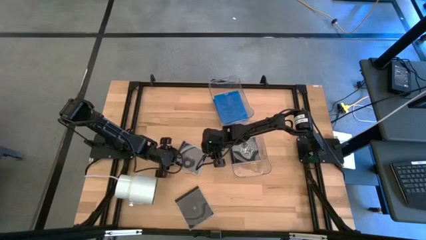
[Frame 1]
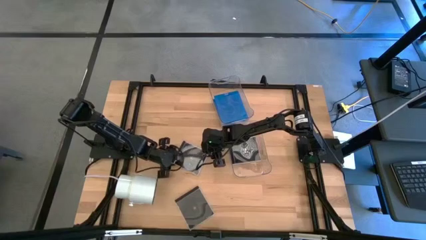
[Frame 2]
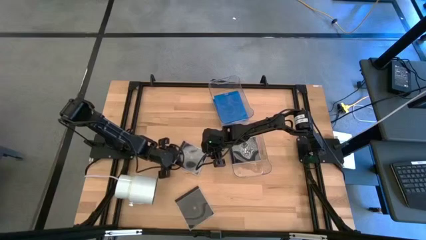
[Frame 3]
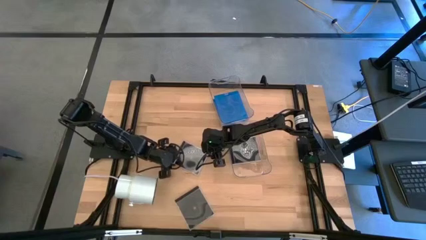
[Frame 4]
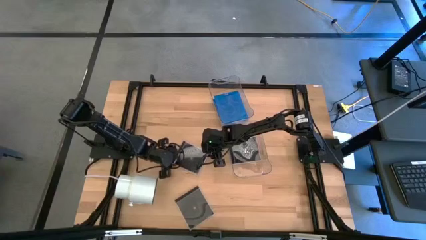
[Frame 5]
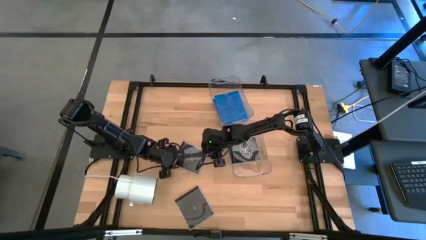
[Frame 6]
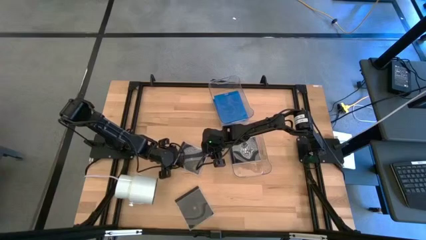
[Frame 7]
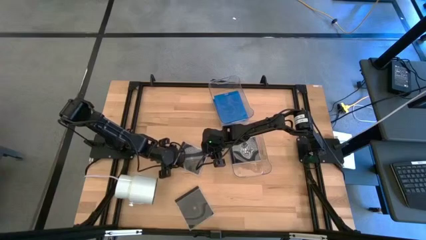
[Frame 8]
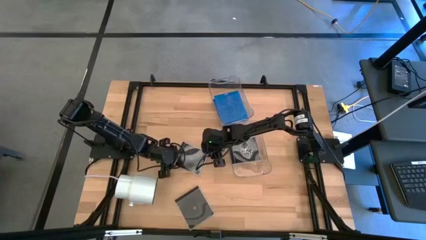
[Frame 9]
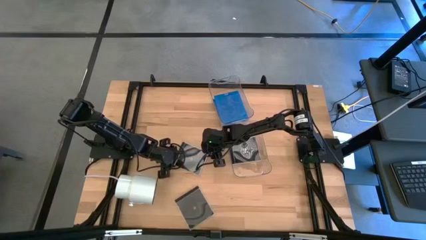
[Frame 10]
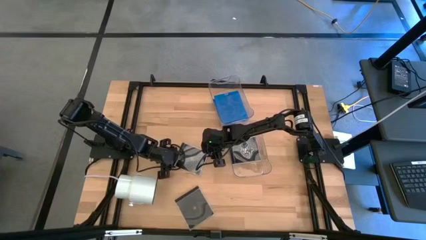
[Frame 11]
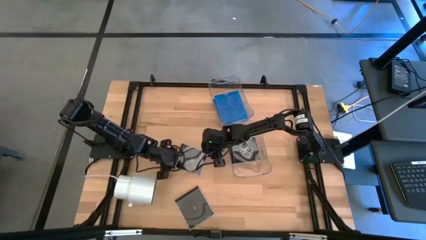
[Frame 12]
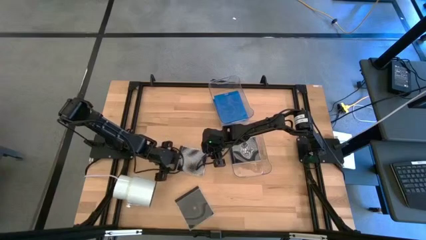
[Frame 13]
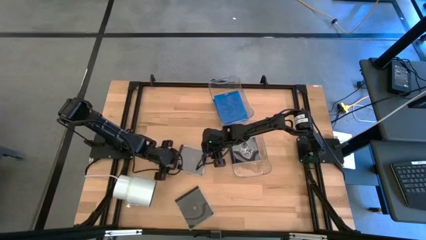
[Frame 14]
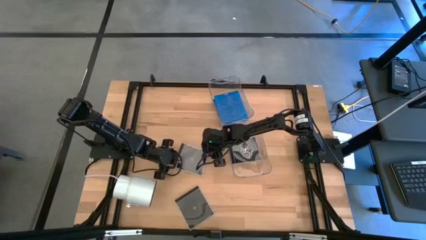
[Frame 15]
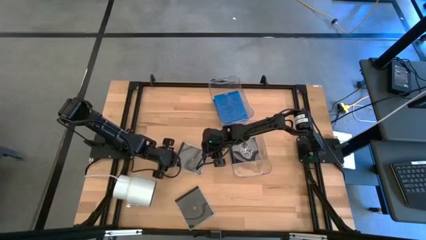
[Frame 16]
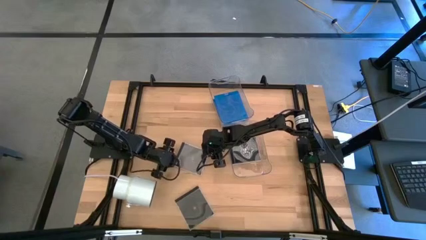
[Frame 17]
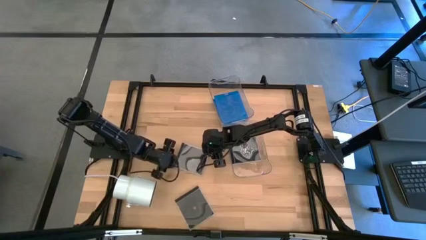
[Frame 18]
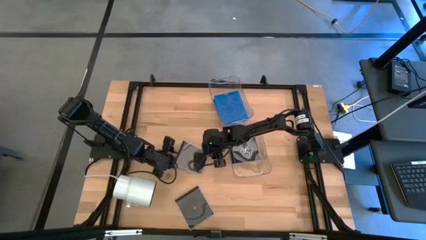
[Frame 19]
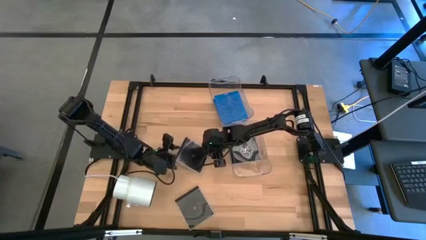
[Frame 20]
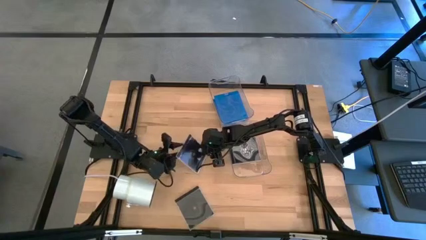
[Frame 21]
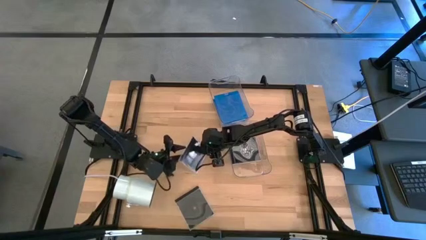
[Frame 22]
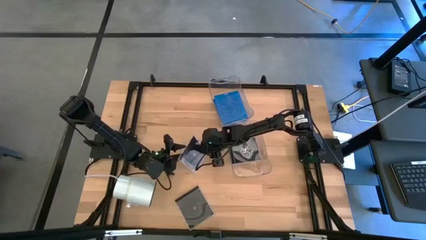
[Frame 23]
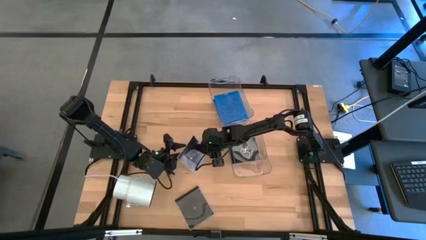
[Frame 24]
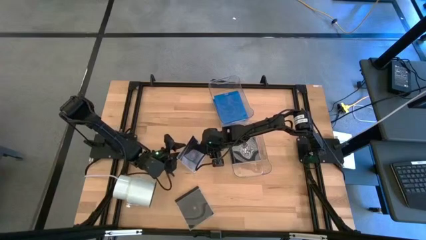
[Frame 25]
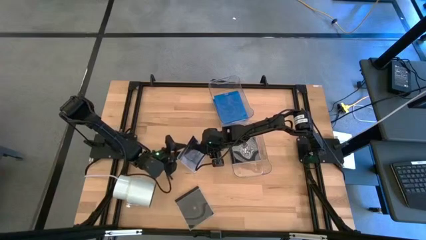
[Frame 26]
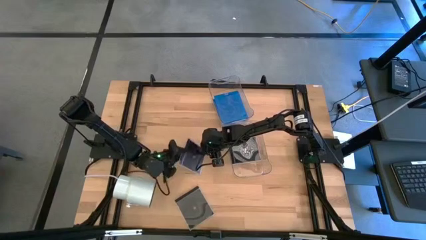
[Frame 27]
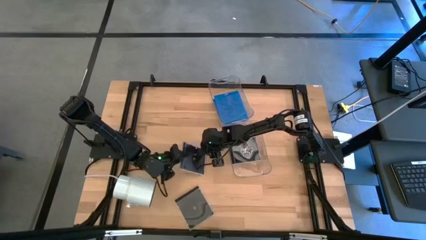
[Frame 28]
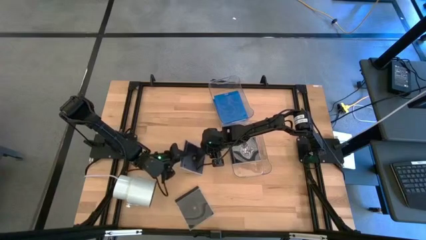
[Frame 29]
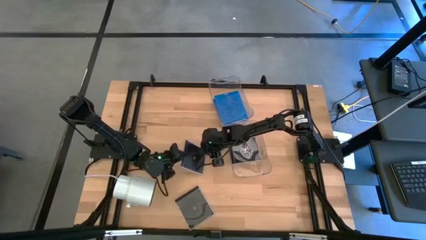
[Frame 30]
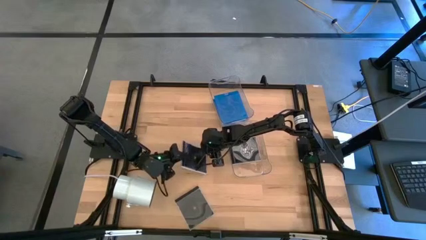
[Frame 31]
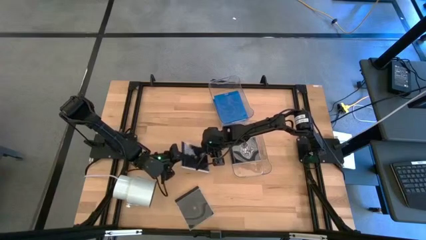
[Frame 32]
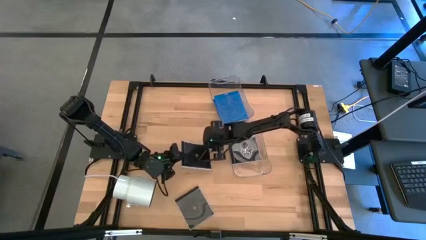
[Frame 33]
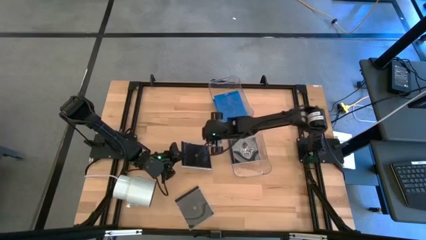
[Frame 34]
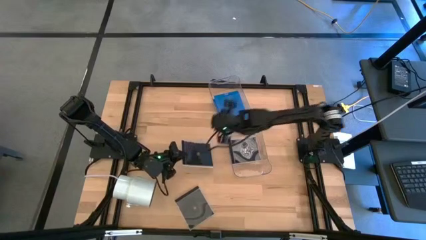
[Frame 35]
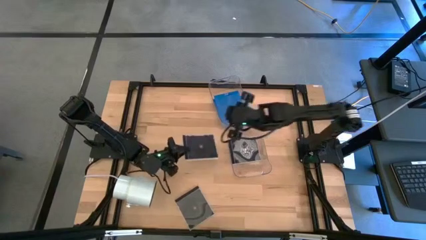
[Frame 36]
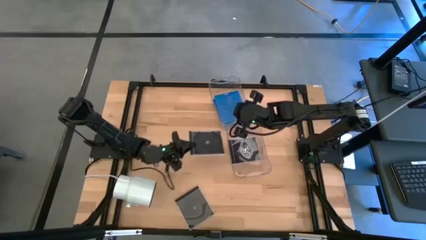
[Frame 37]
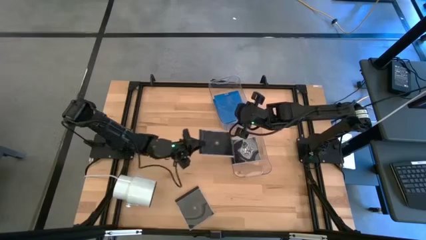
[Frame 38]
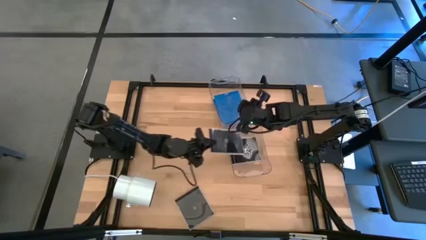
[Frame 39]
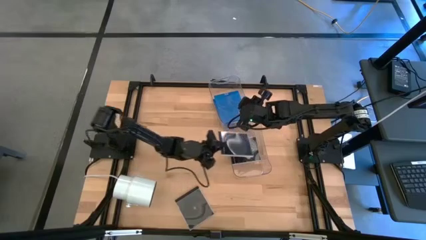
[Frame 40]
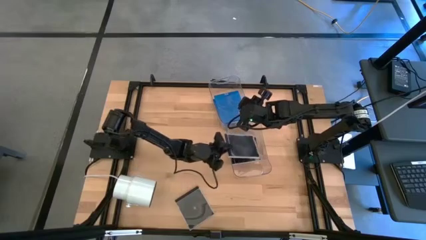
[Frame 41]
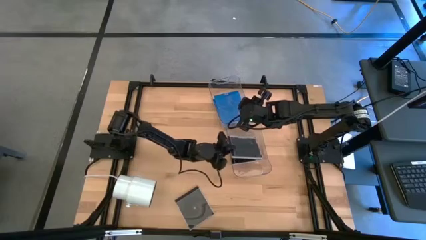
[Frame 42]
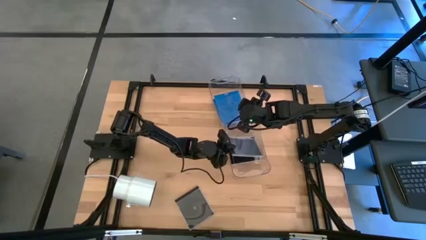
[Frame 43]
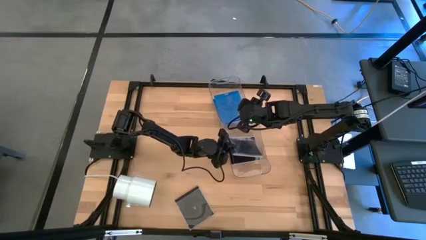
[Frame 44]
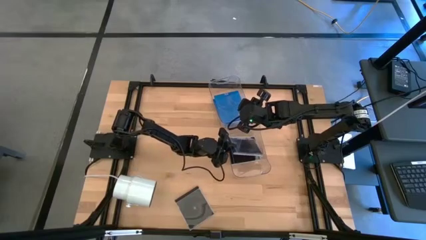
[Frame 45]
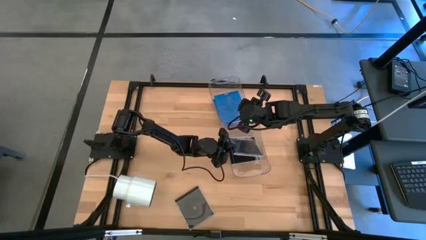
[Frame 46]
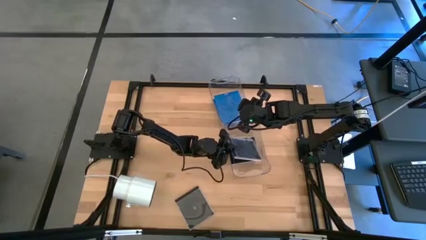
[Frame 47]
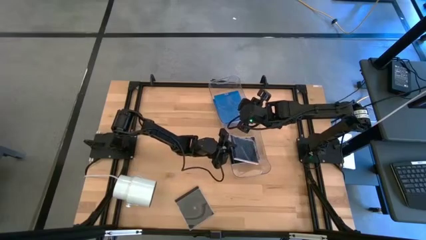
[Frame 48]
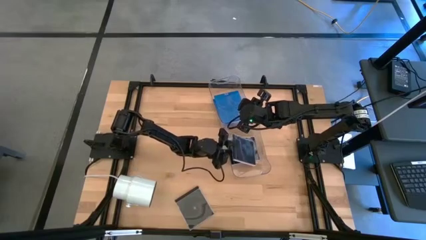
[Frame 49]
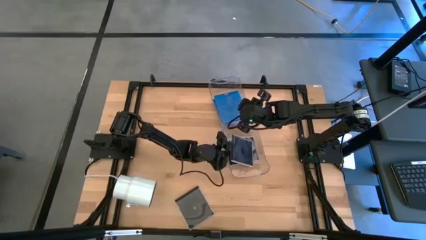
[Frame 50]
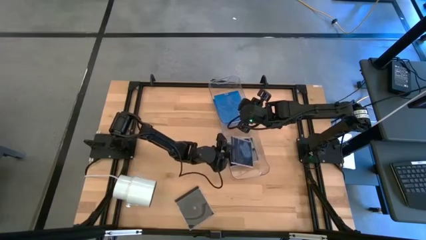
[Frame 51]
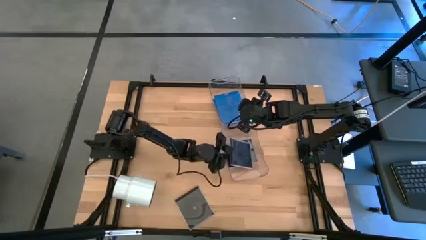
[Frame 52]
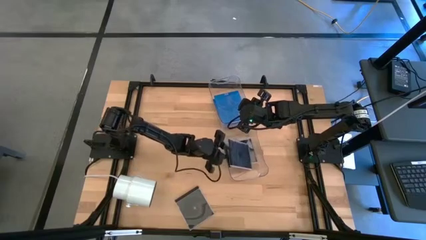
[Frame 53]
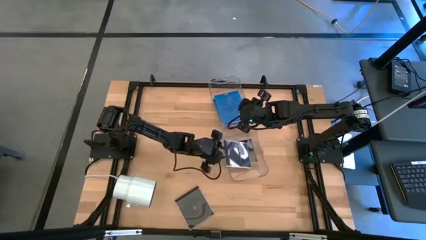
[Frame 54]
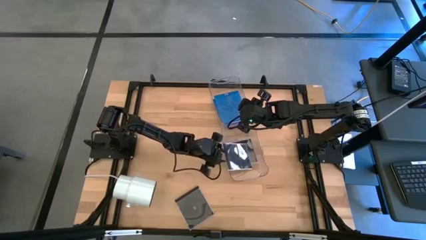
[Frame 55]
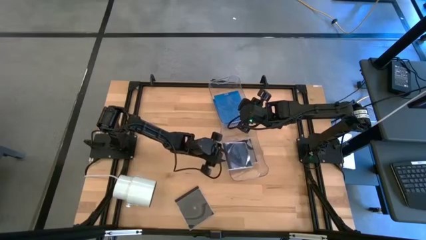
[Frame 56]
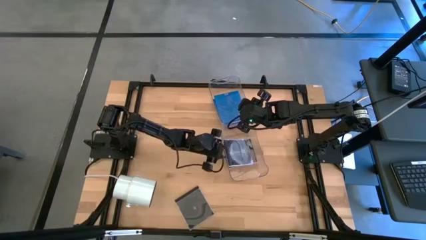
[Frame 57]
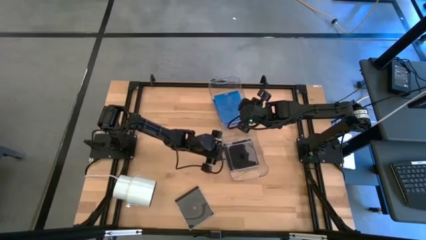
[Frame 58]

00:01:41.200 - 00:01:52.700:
Task: Pick & place jewel cases by type
Put the top black CD case into the bottom transparent bin

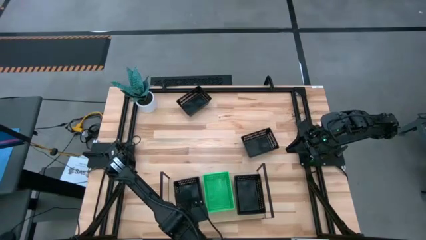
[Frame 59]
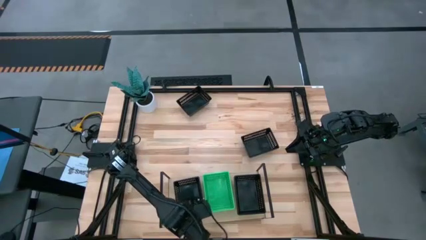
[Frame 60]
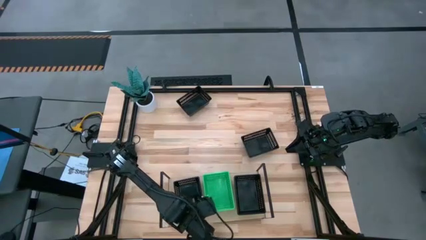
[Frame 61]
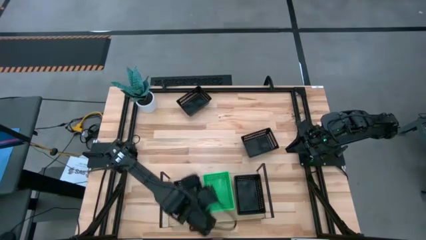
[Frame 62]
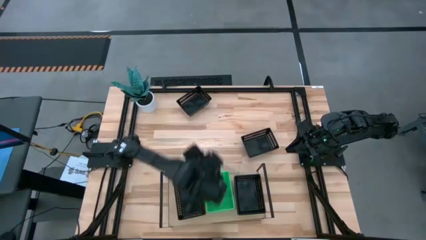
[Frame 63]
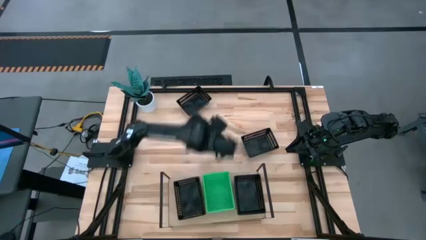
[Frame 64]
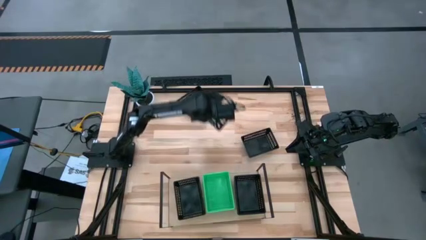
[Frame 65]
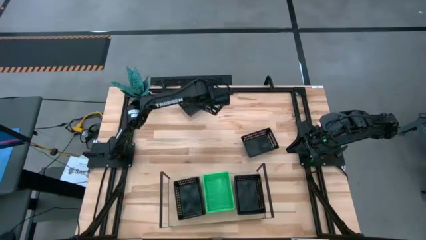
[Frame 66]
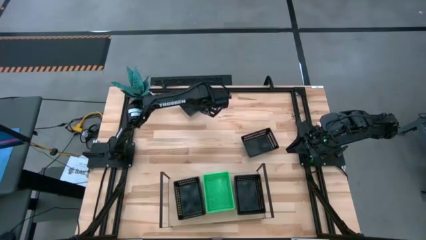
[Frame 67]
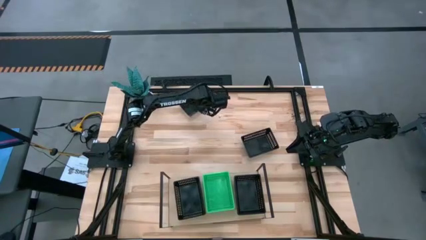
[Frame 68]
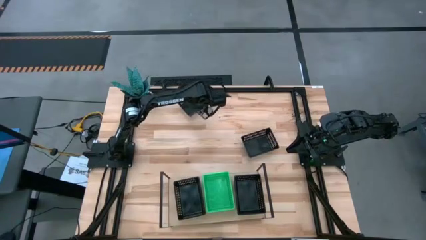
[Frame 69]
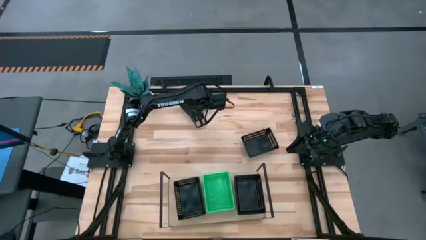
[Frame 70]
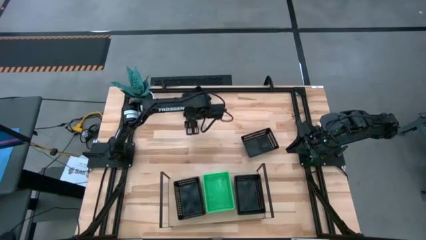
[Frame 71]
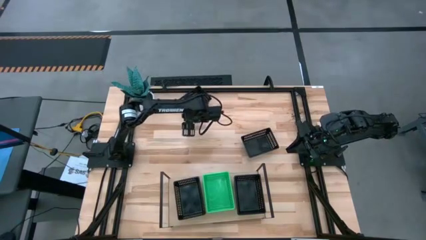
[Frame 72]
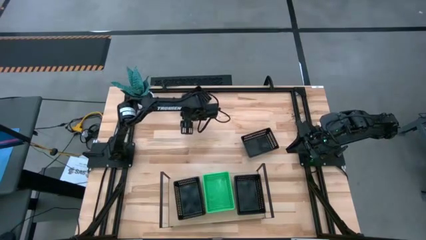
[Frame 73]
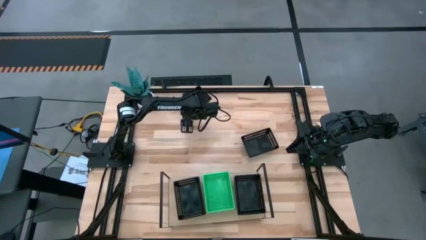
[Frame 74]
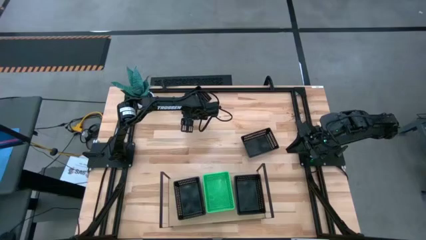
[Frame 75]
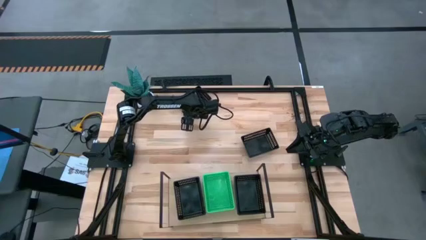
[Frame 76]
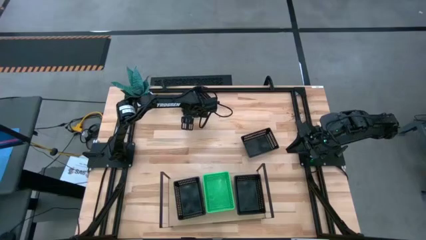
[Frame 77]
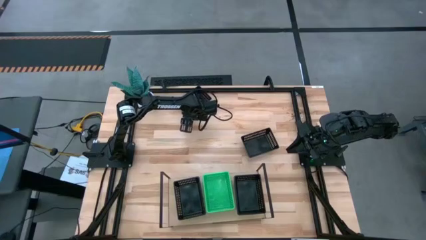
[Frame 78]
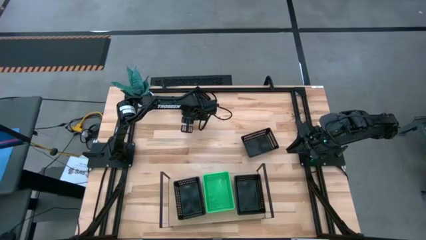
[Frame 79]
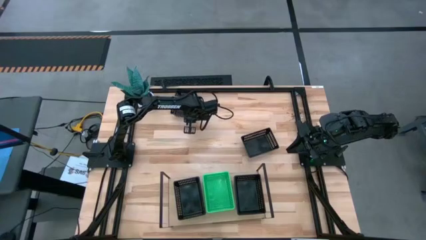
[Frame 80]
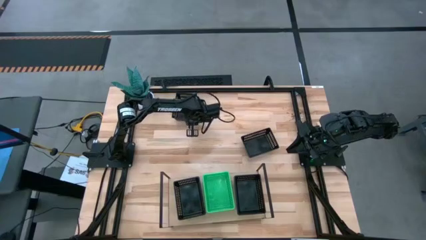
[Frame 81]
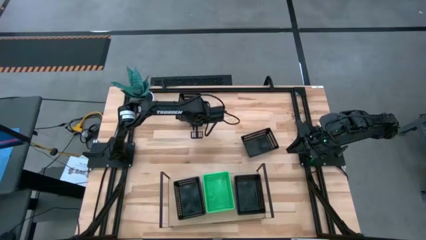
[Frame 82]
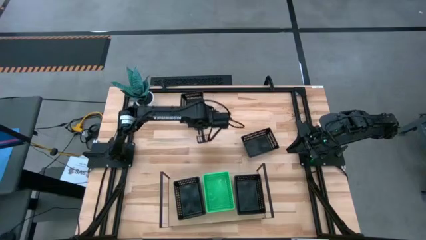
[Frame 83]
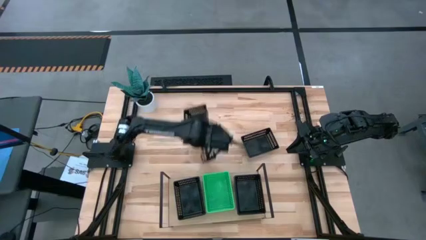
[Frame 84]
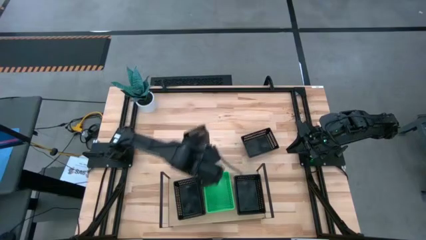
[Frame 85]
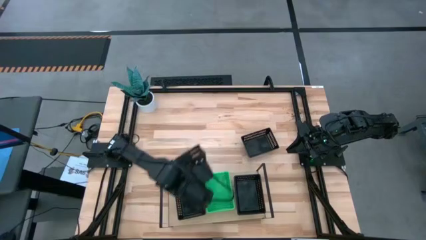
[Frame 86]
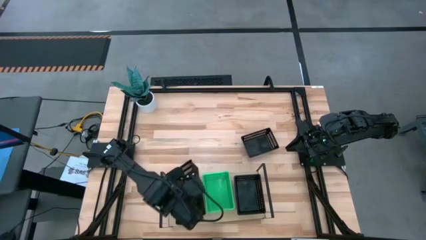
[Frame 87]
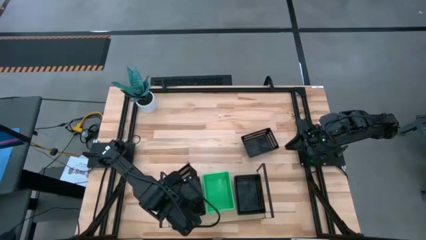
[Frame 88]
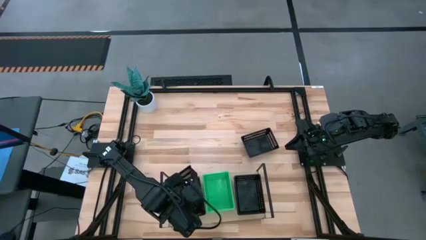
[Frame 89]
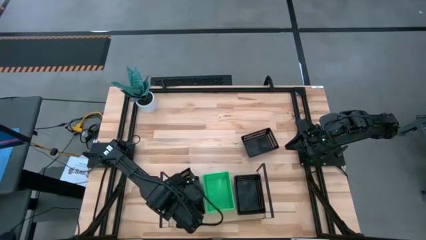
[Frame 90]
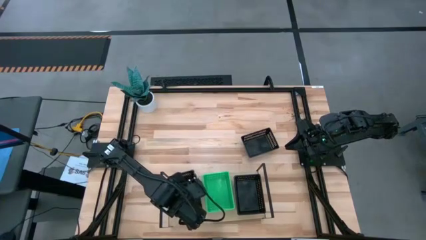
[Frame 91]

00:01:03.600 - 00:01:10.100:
Task: Stack baskets on shelf by color
Stack the black bin on the black bin on the shelf
